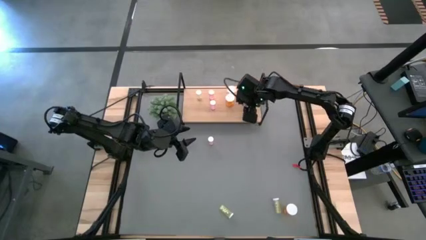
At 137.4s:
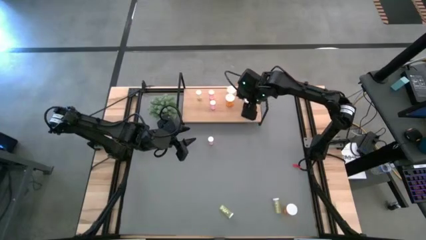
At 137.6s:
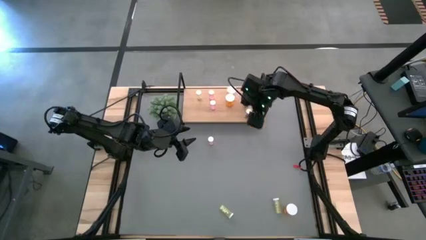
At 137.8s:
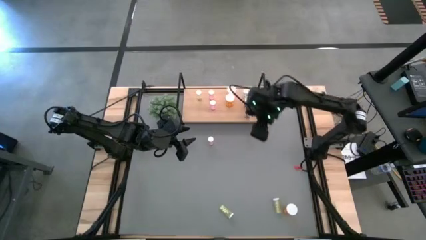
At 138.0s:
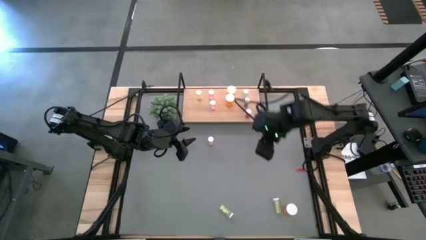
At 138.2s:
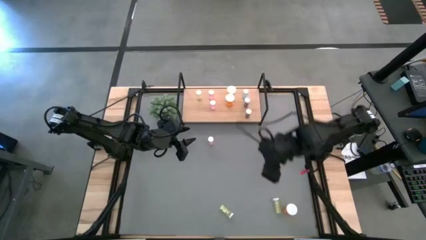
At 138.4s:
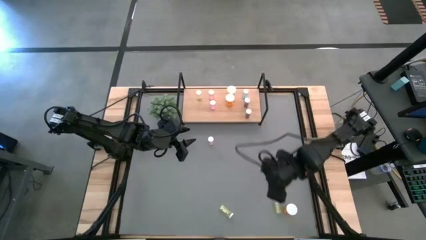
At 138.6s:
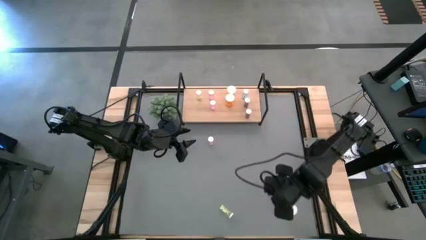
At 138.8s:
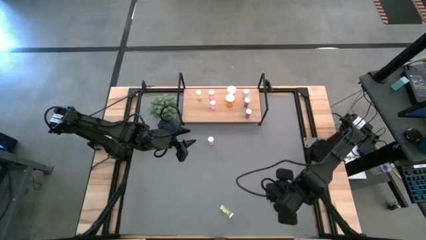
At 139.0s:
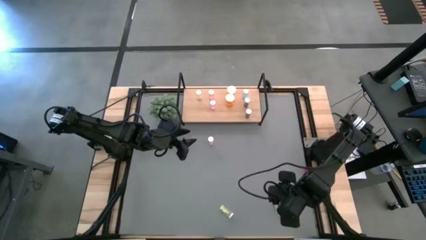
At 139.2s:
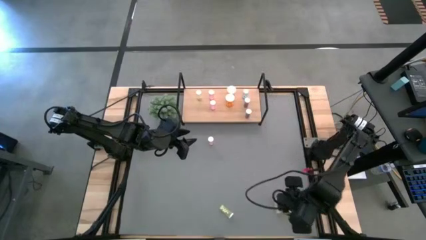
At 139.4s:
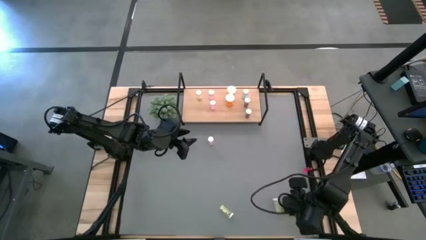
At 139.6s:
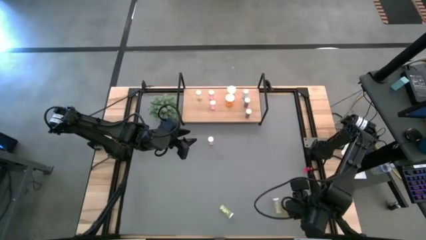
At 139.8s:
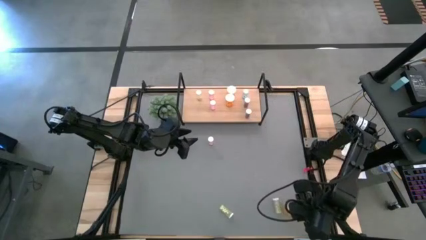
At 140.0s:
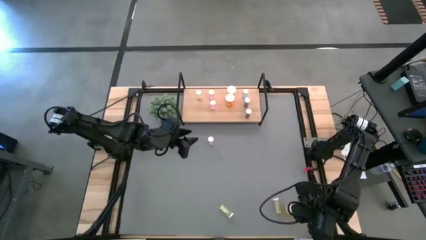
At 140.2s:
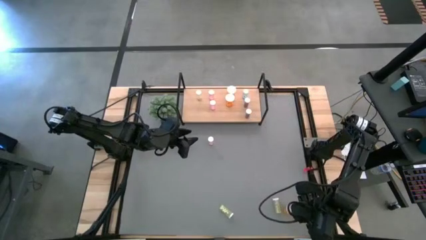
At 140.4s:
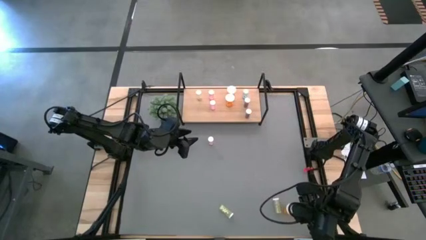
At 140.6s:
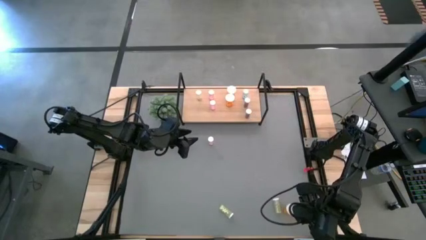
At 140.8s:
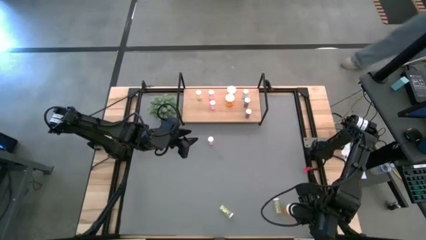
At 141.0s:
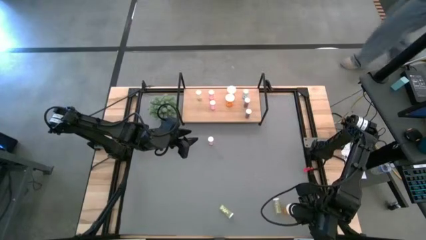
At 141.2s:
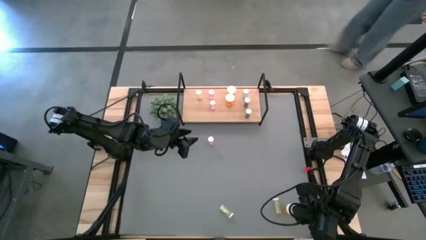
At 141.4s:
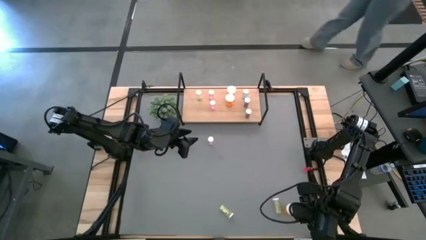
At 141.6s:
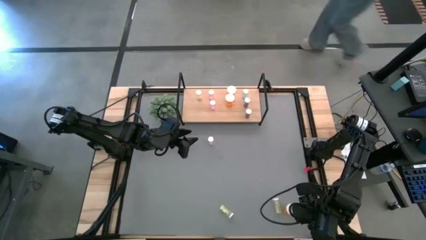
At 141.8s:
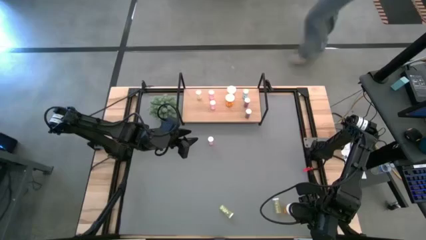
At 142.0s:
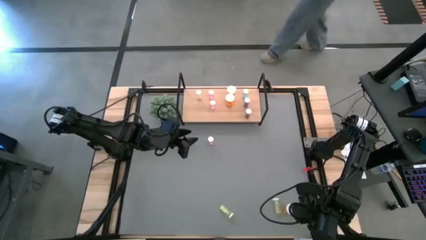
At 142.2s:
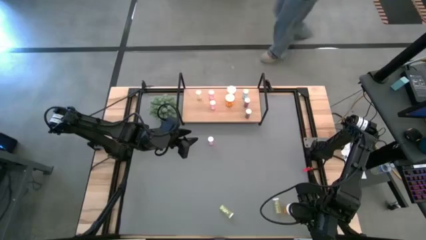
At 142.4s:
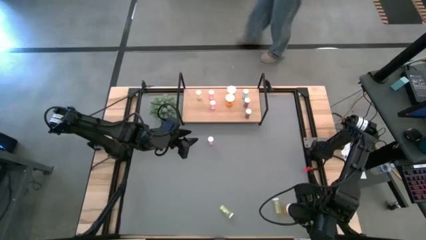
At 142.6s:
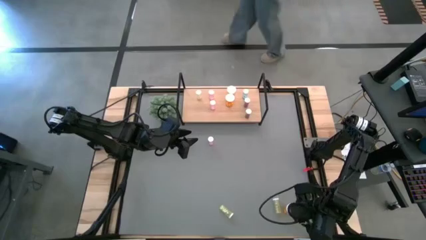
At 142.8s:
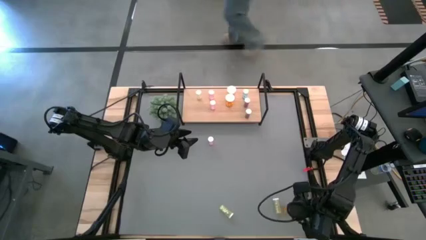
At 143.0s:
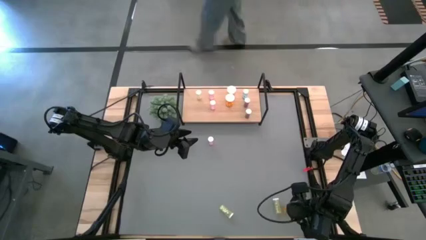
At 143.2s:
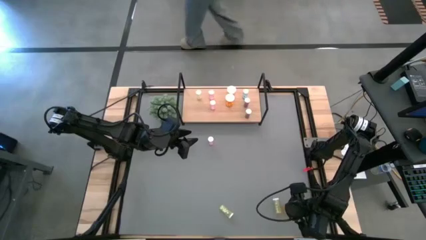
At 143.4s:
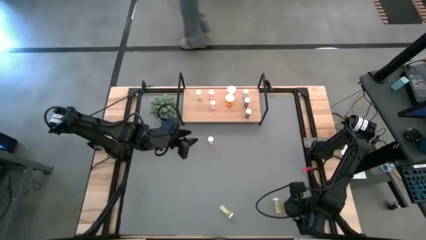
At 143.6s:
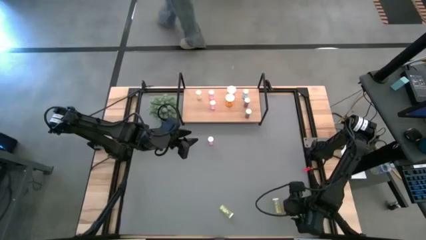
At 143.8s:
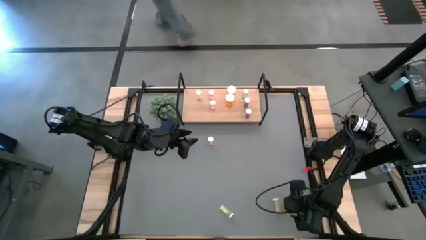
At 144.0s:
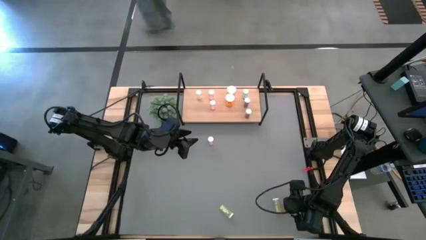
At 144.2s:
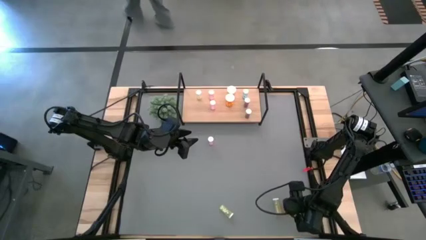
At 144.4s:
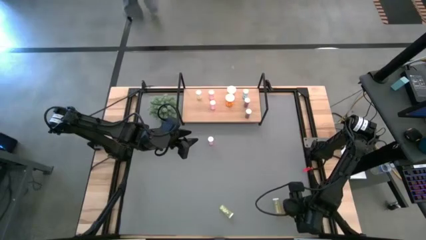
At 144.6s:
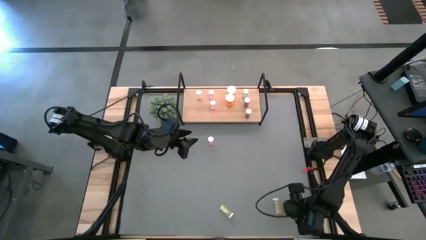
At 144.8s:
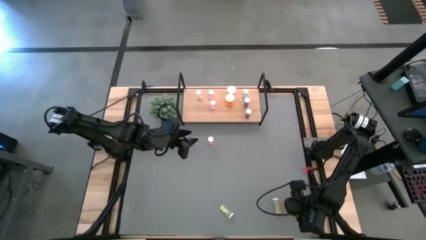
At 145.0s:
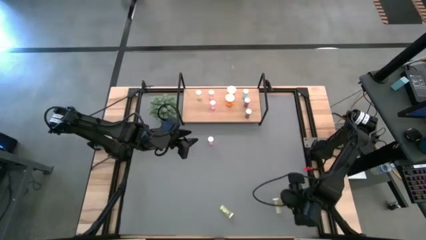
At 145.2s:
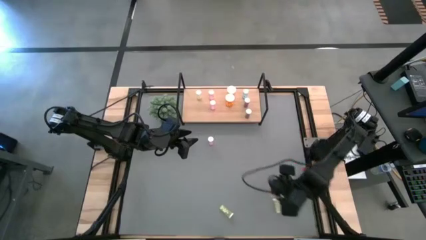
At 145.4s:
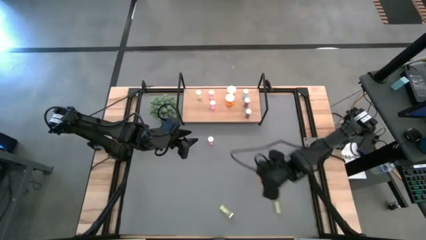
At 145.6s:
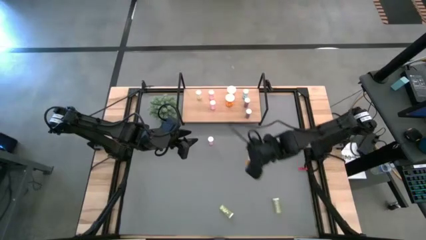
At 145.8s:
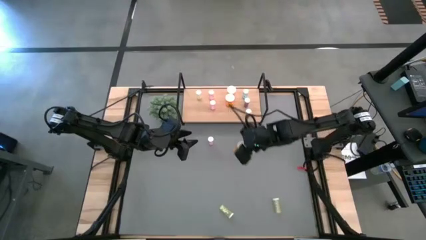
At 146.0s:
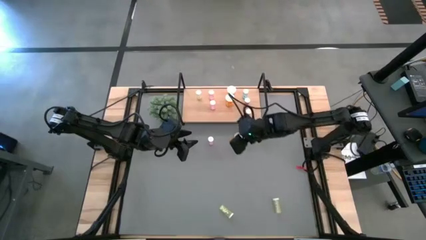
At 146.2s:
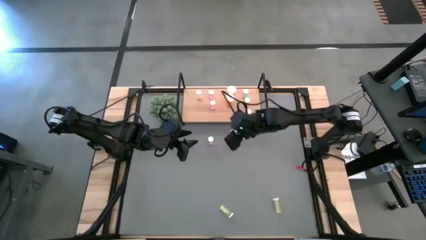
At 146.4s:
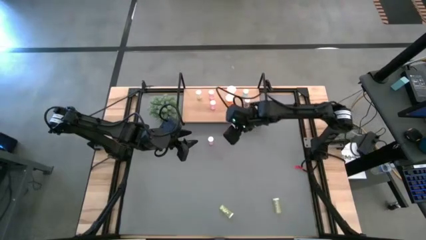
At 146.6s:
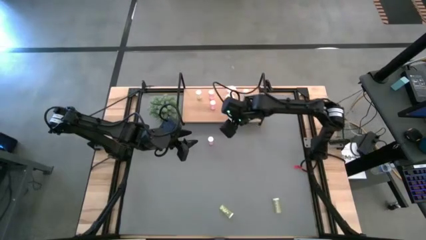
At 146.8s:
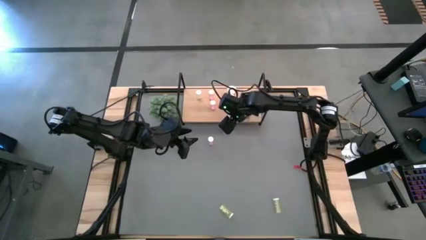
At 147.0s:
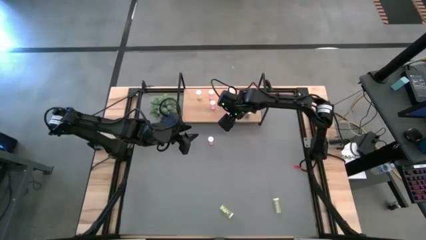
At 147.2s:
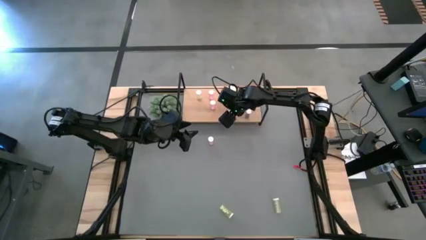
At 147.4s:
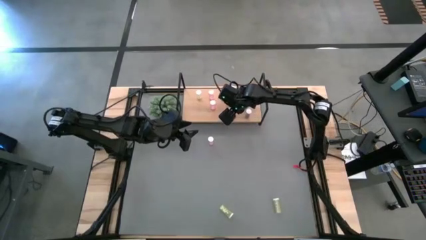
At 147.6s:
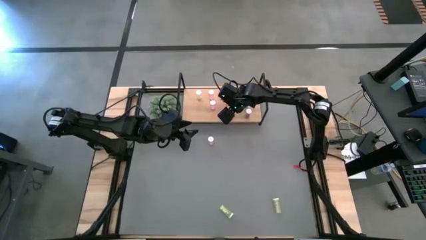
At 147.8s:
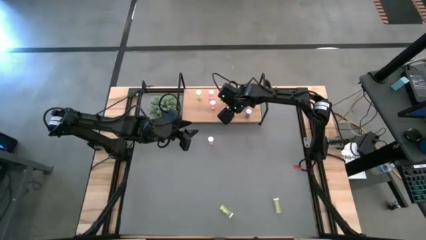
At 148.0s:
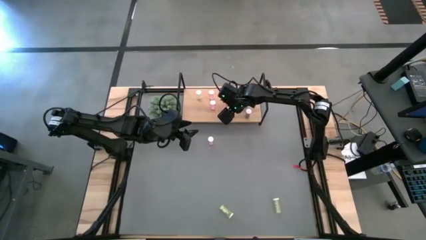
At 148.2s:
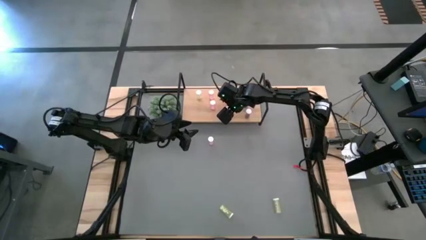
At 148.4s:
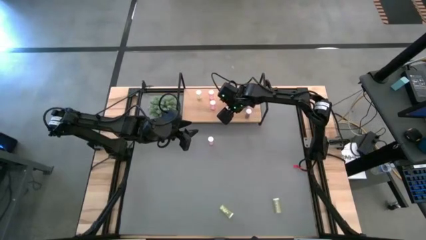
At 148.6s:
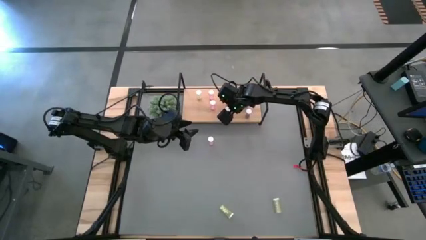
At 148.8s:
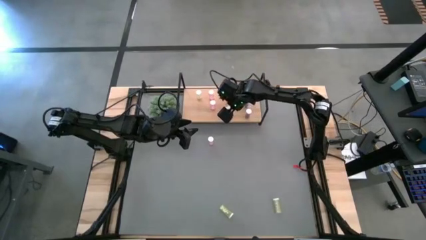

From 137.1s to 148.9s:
Task: Pick and place medicine bottles onto shelf by color
Put the orange pill bottle on the shelf aligned with the other orange pill bottles

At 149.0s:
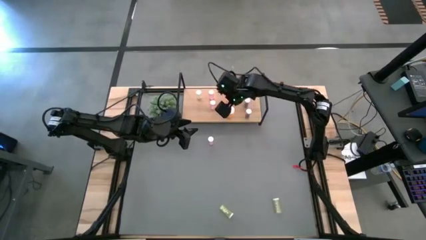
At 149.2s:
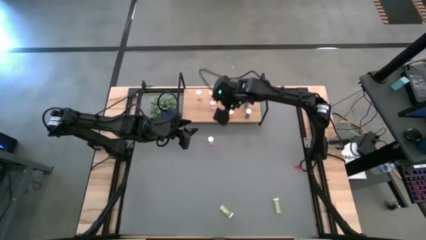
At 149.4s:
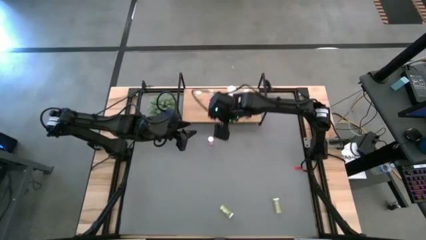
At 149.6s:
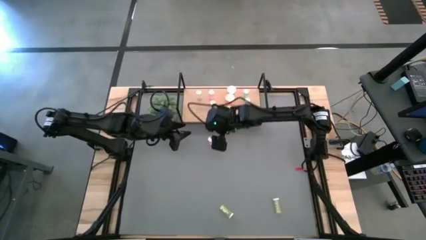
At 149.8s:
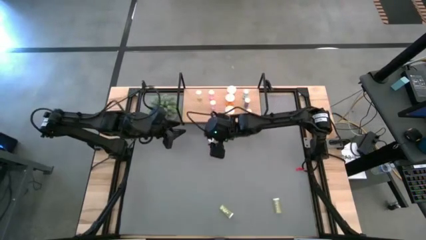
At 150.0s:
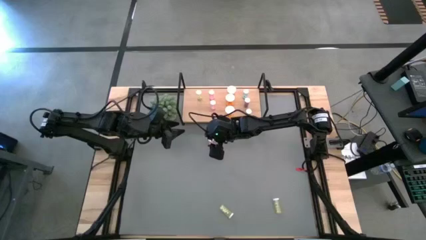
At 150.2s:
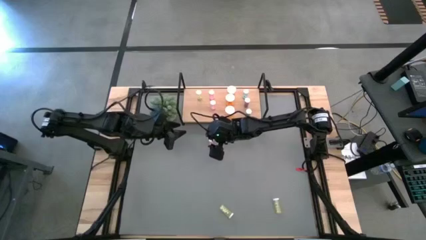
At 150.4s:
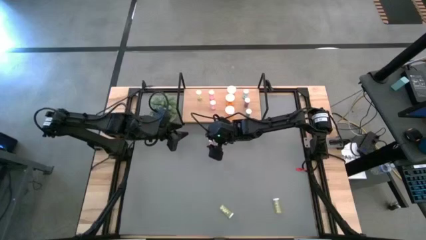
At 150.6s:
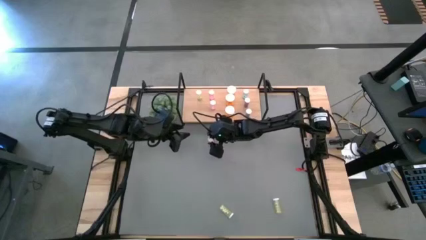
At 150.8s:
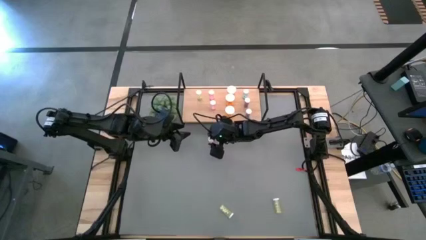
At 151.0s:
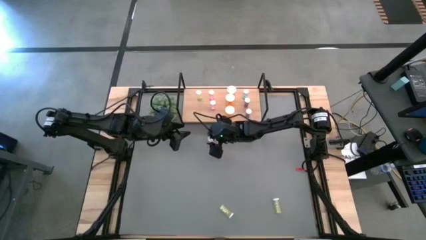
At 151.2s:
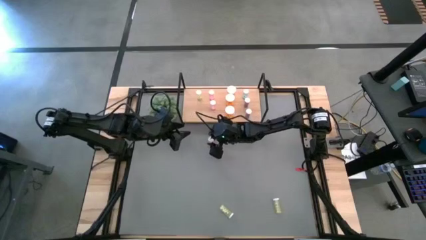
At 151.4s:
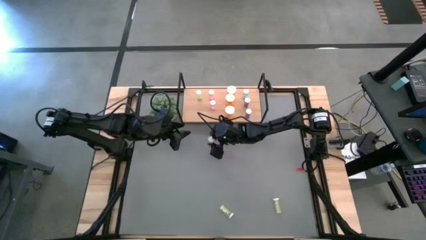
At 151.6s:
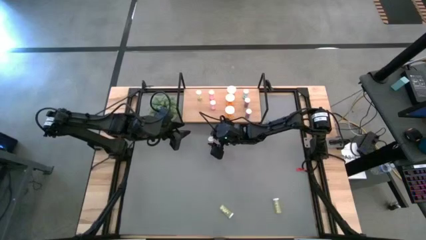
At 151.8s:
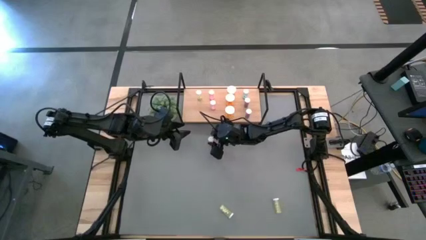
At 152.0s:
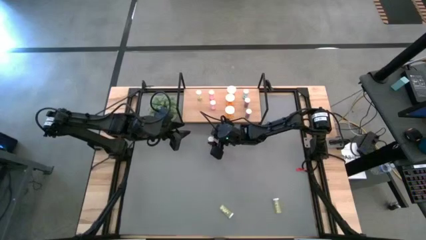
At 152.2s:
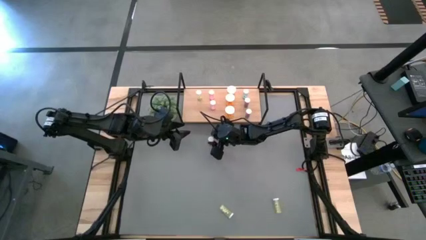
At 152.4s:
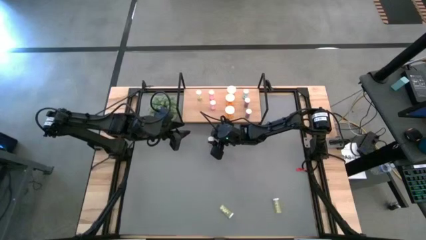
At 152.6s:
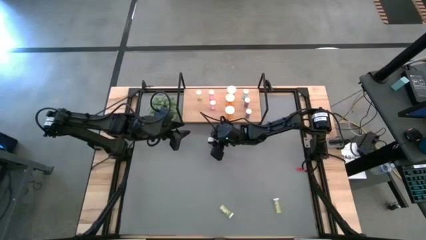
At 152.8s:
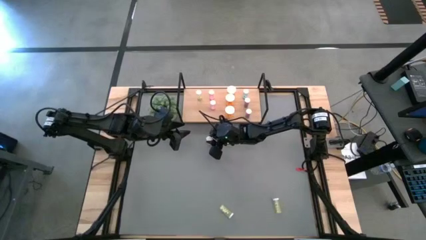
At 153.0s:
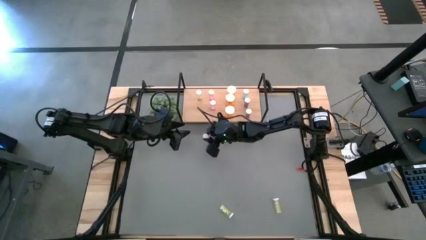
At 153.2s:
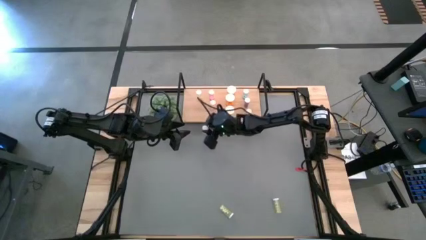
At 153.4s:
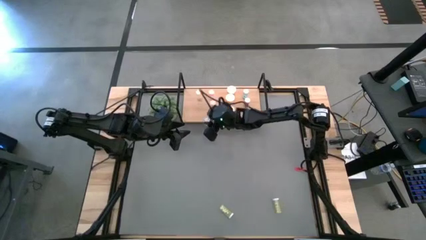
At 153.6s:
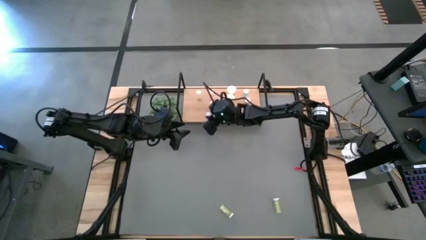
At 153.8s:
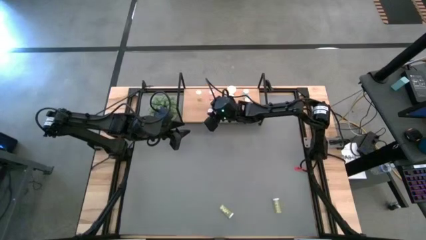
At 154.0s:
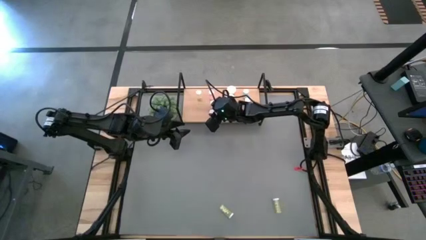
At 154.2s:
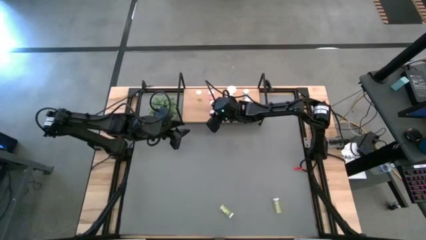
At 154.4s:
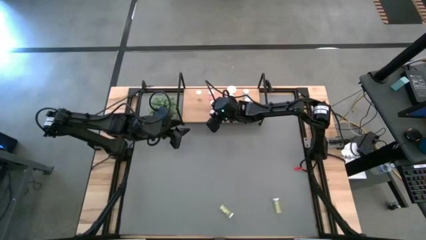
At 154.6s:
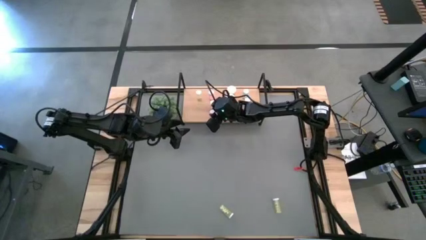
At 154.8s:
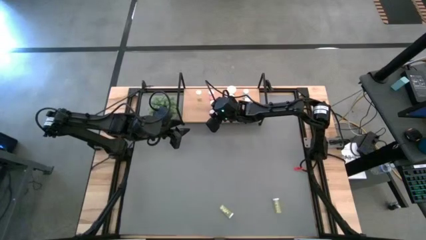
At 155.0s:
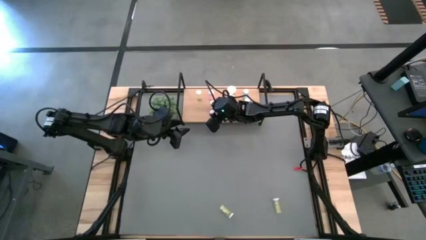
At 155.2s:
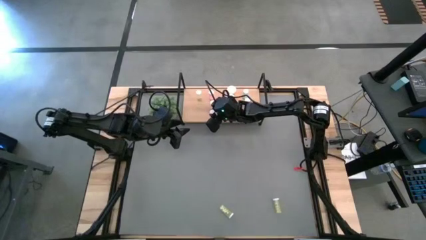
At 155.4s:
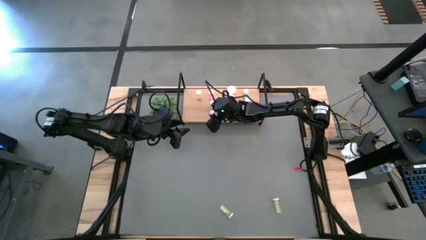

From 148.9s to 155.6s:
Put the pink pill bottle on the shelf aligned with the other pink pill bottles
